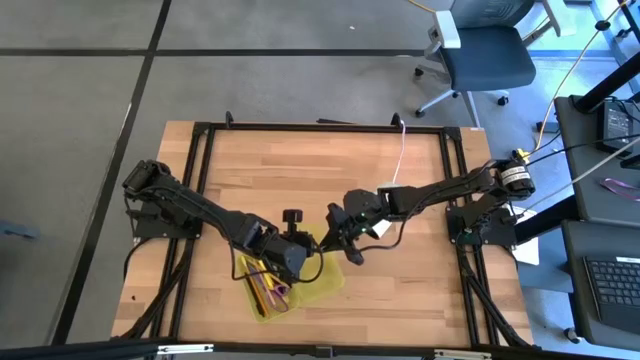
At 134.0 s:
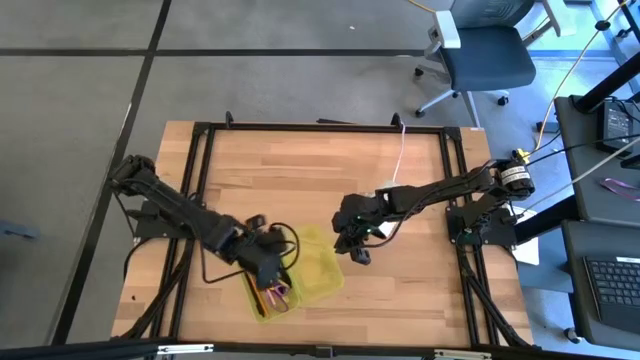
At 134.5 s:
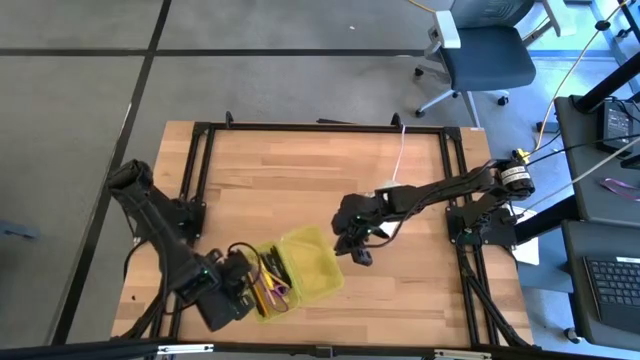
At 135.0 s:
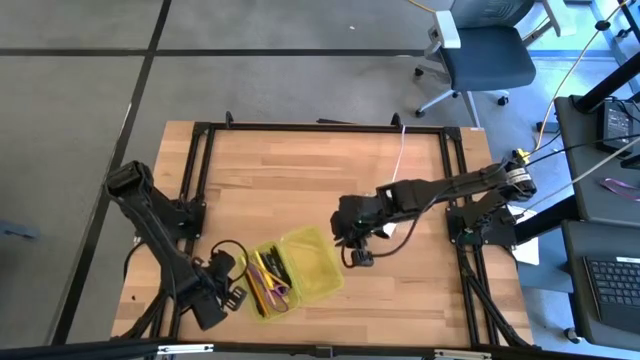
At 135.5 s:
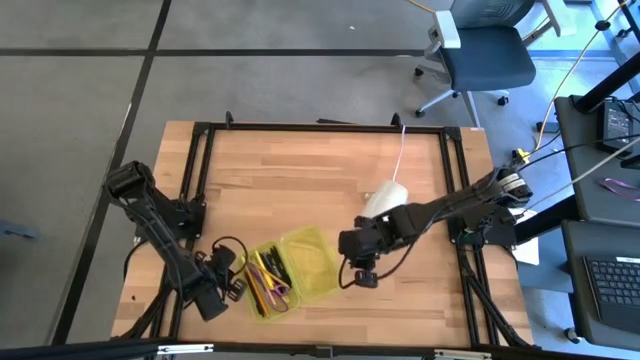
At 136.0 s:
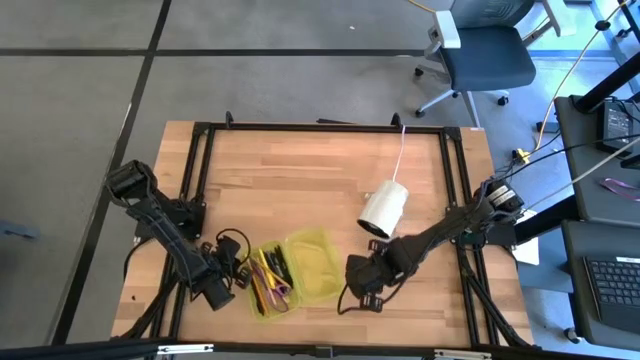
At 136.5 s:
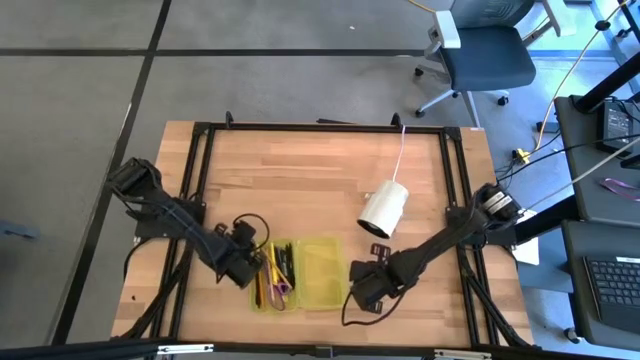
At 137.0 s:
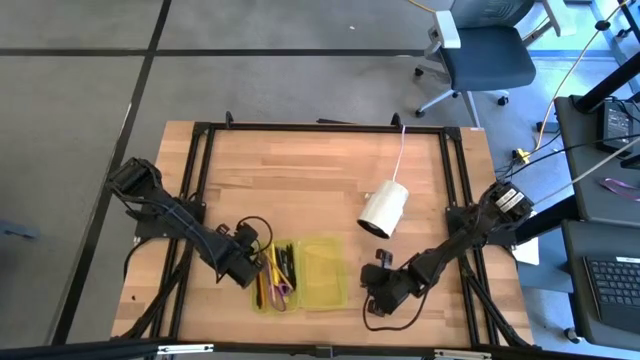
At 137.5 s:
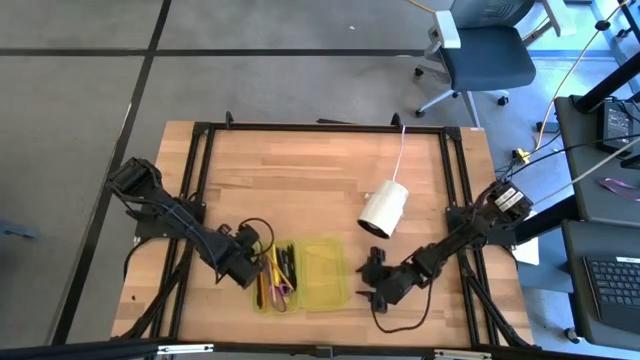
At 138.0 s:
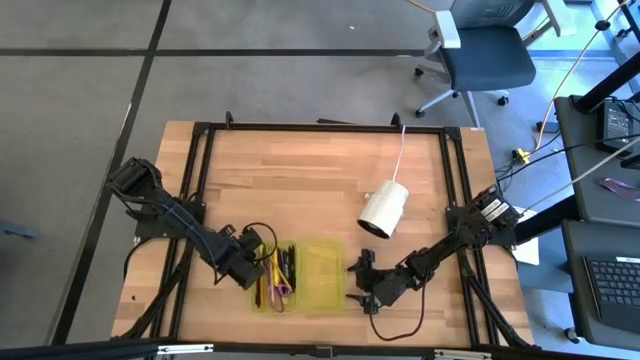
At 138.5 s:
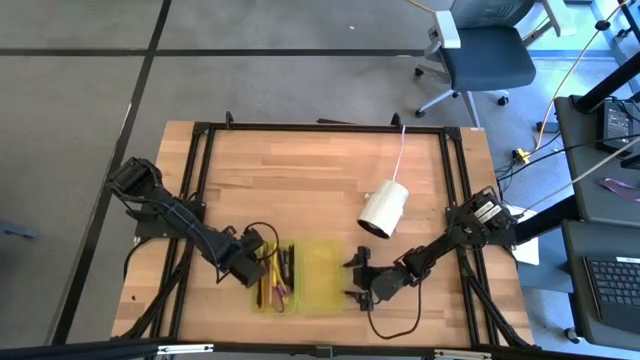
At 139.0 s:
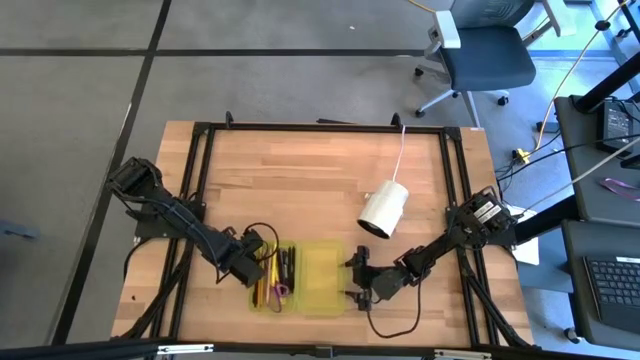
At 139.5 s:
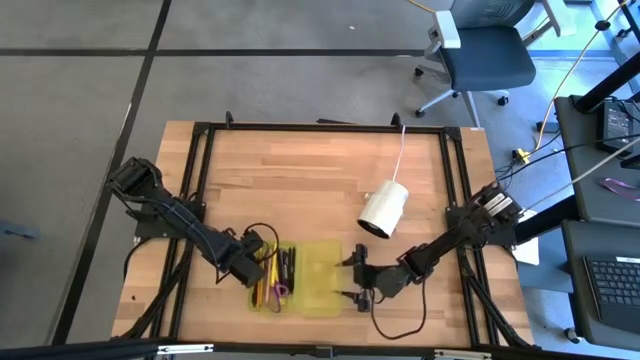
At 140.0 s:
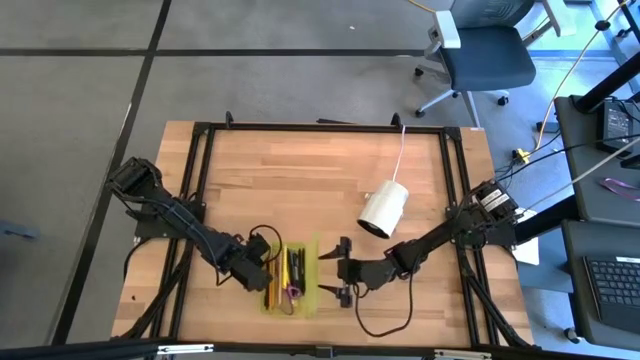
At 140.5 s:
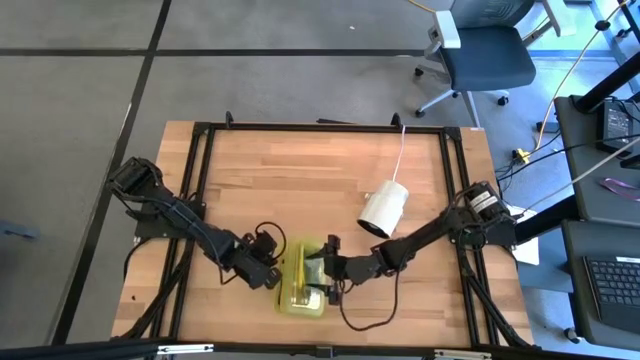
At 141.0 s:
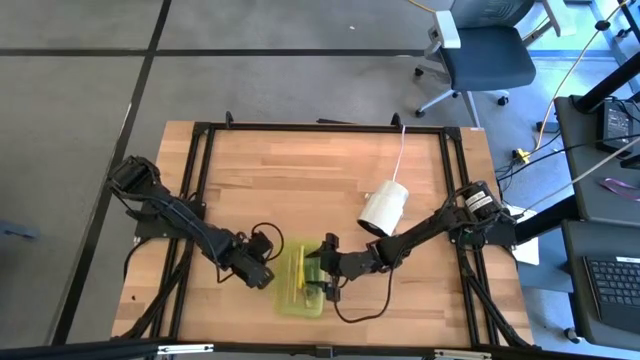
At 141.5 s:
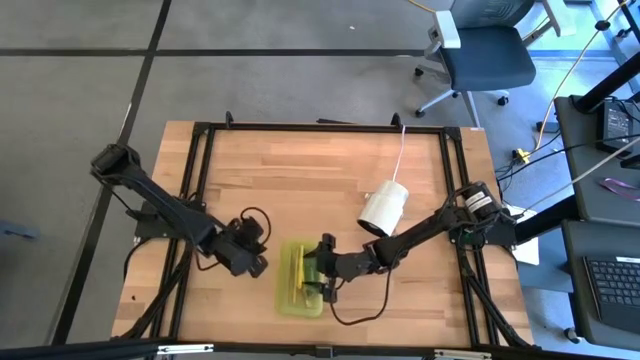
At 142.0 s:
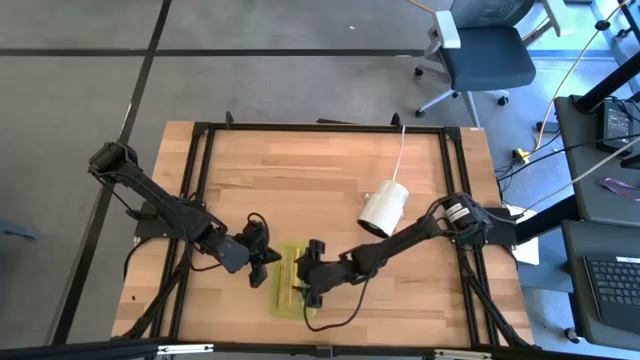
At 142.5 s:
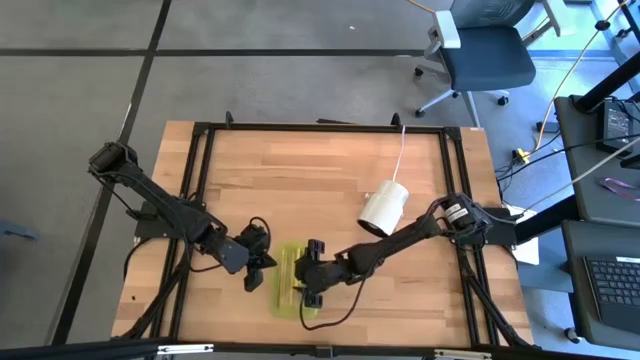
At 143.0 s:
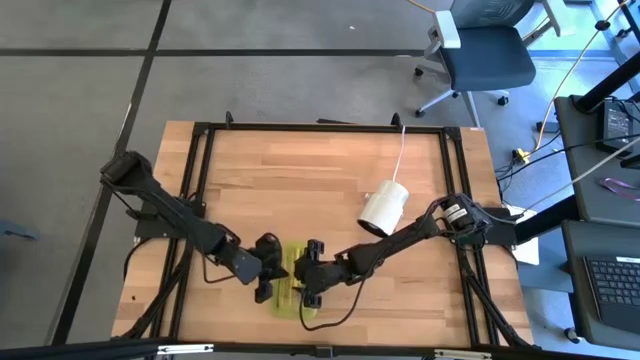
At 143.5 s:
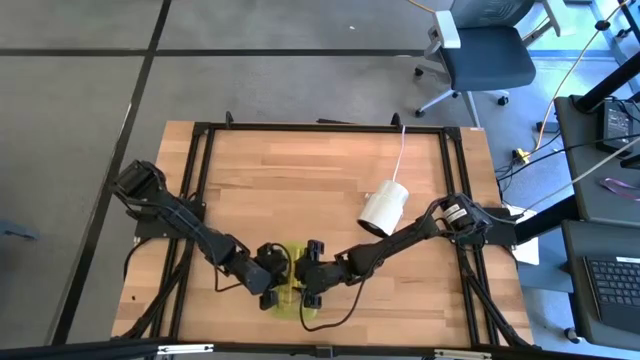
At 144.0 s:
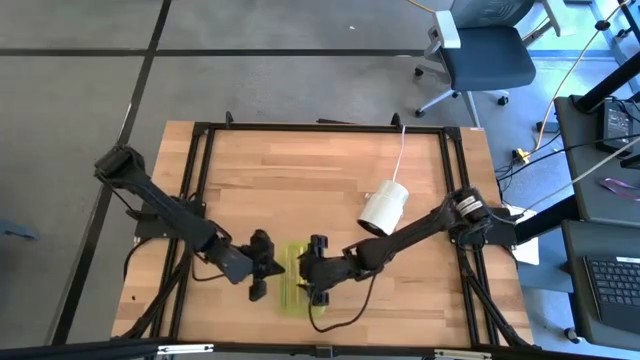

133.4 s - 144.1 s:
Task: Pick & place school supplies into a supply box
Close the yellow supply box

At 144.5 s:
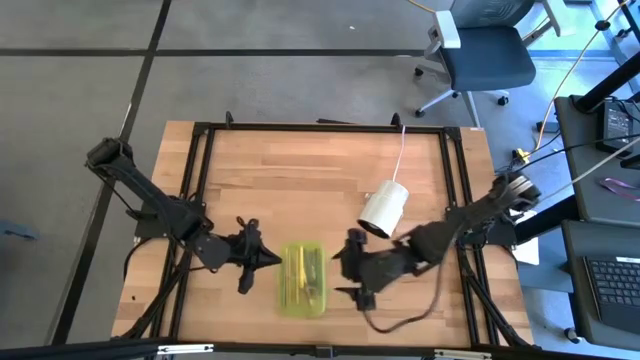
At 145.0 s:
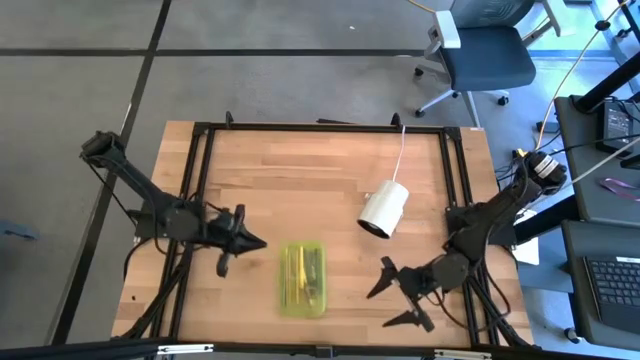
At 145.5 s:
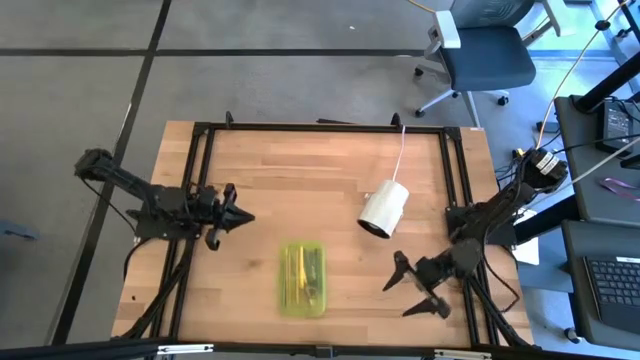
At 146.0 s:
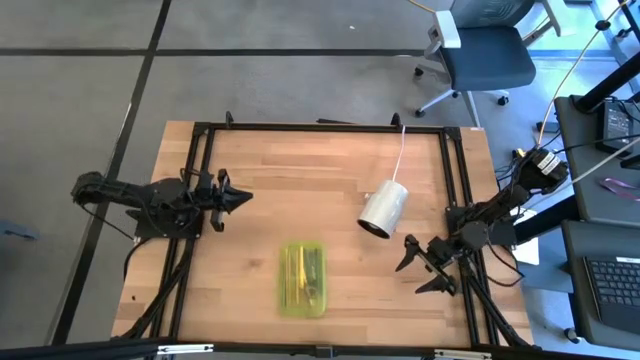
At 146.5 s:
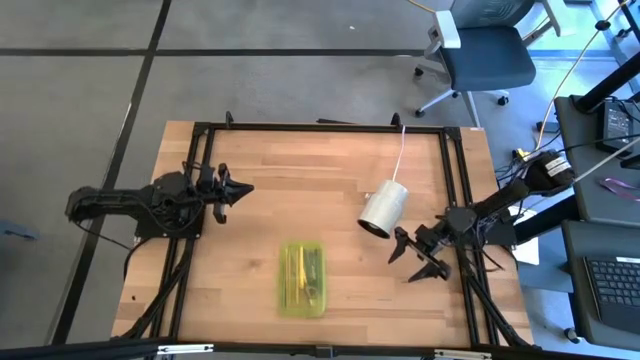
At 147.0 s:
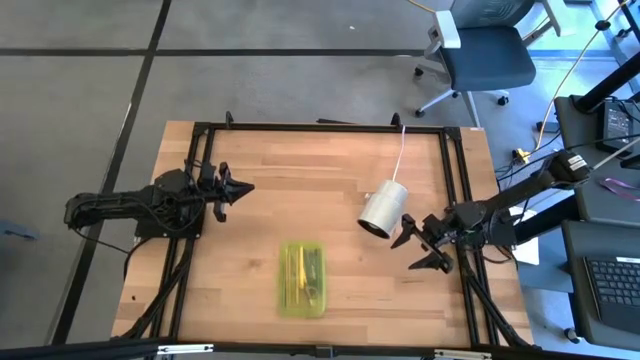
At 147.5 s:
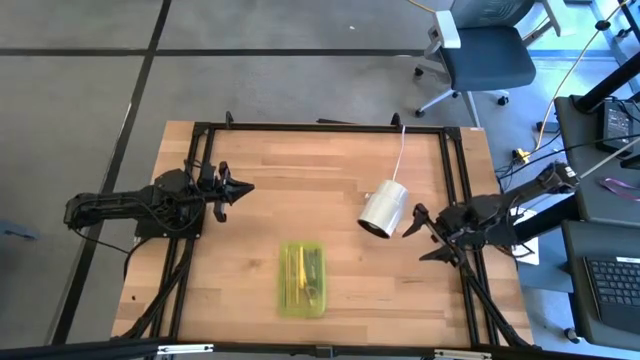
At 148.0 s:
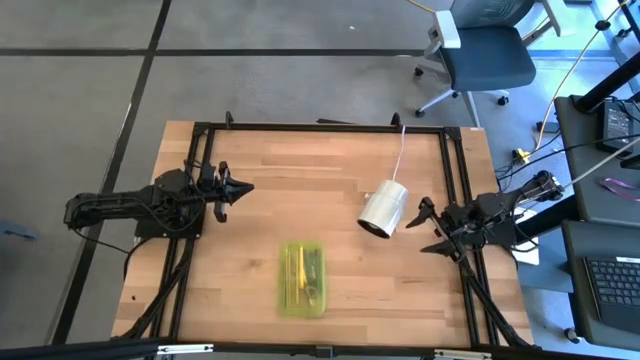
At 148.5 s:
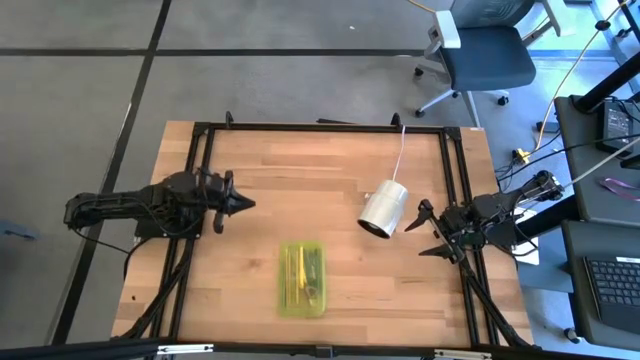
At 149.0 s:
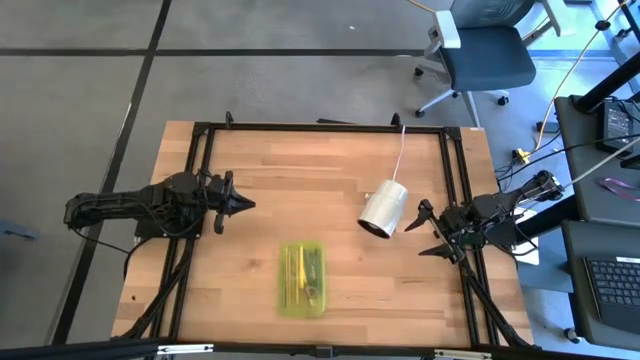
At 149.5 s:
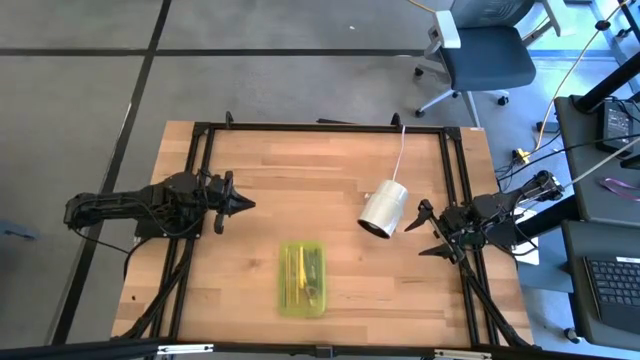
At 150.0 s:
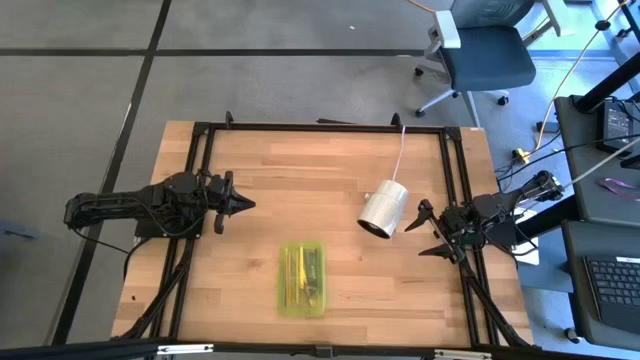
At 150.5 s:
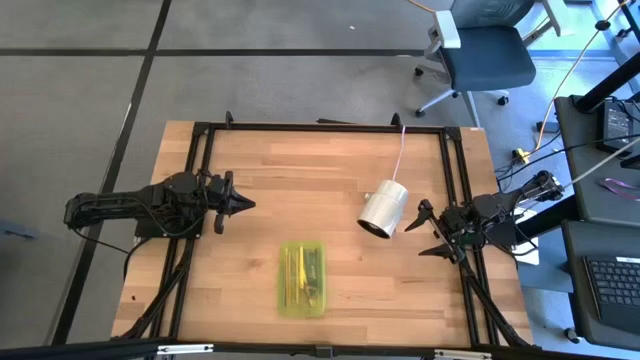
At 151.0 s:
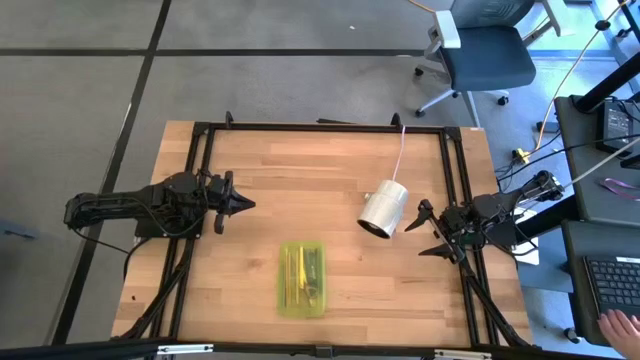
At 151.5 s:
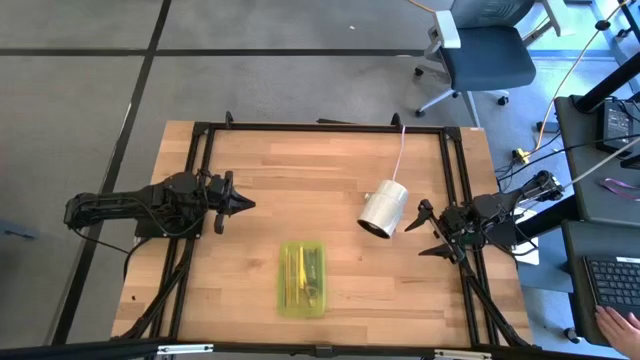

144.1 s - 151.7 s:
Return to Home Position
